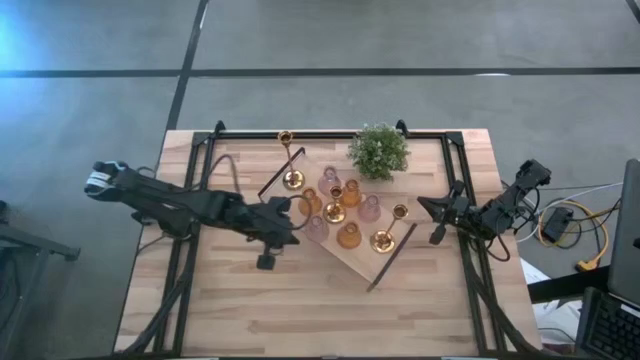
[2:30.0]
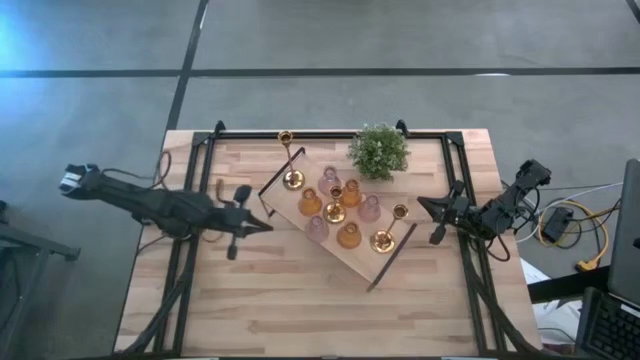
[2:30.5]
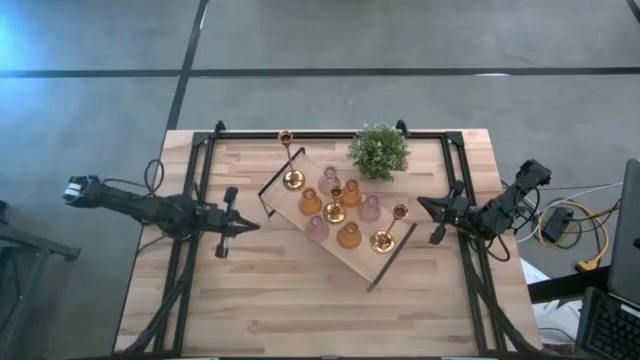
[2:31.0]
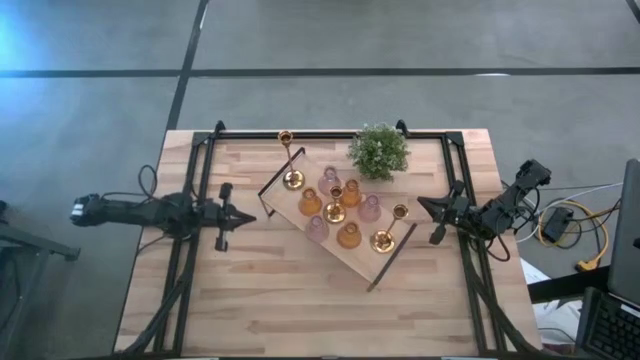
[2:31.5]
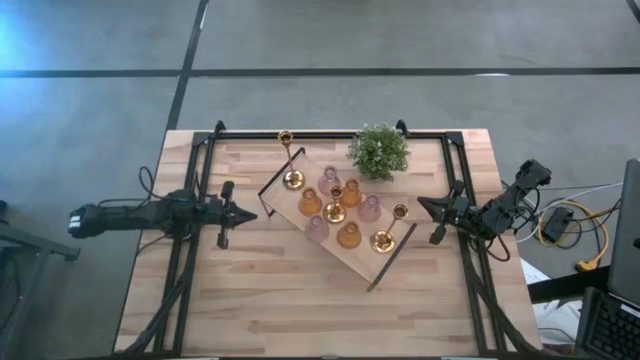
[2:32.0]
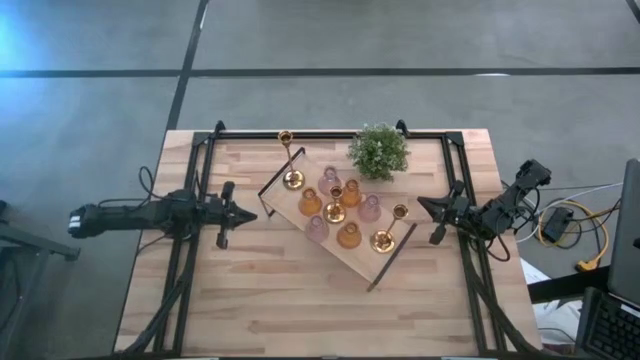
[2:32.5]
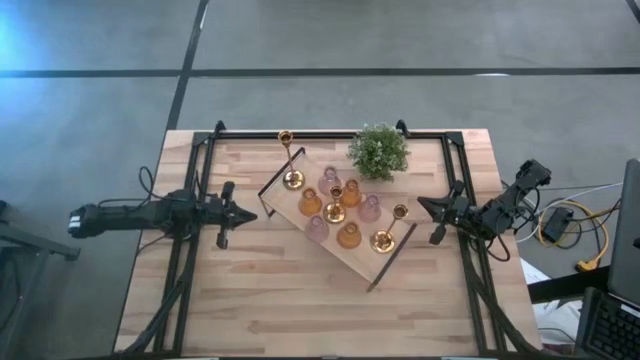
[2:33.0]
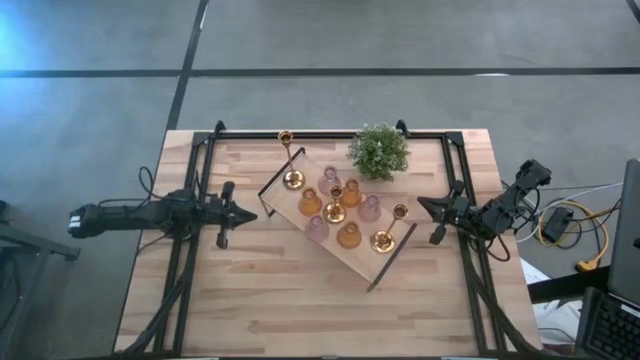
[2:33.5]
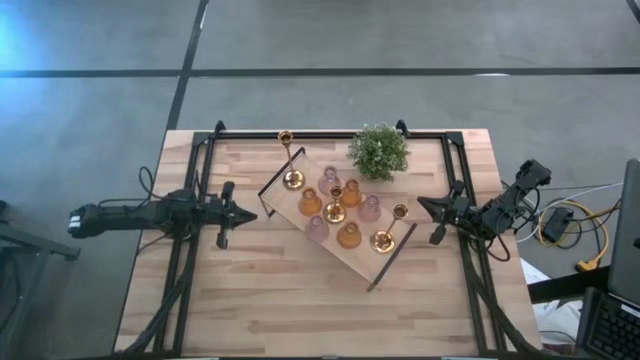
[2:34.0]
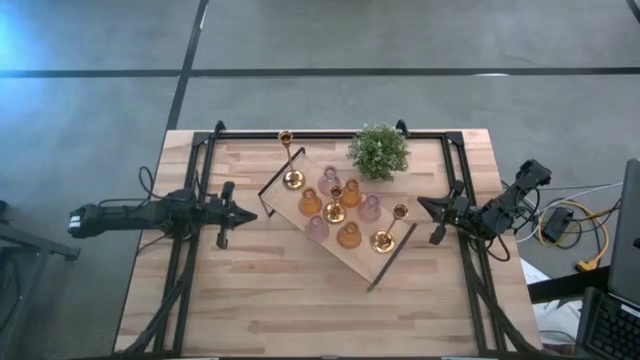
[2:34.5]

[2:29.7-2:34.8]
Task: Pick & Place candle stick holders
Return to Home Position

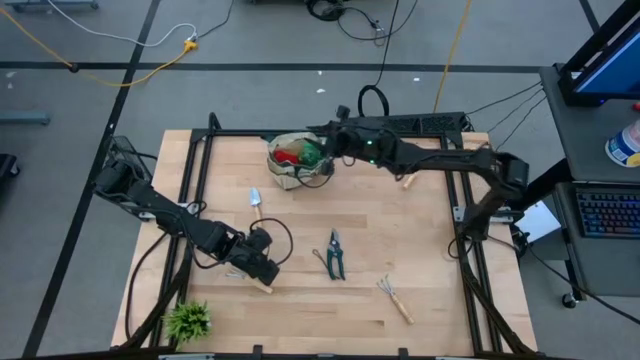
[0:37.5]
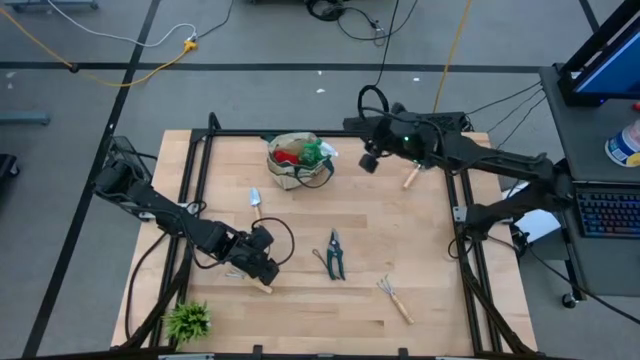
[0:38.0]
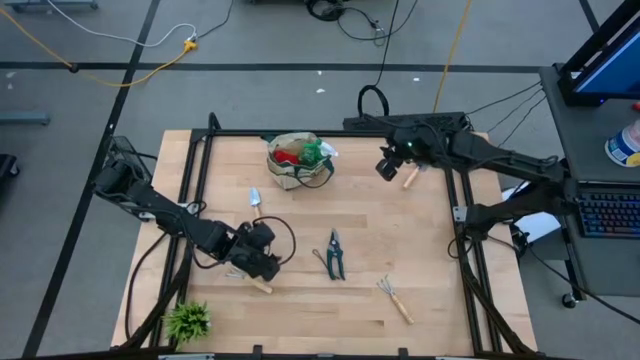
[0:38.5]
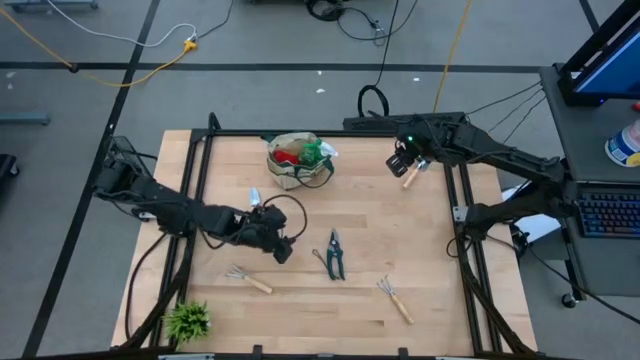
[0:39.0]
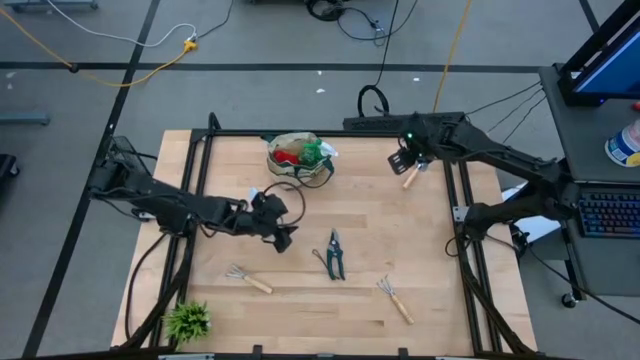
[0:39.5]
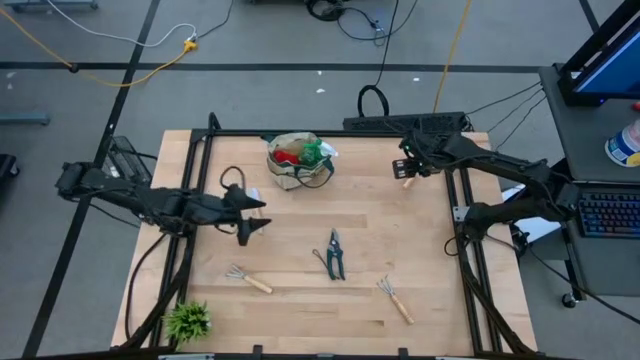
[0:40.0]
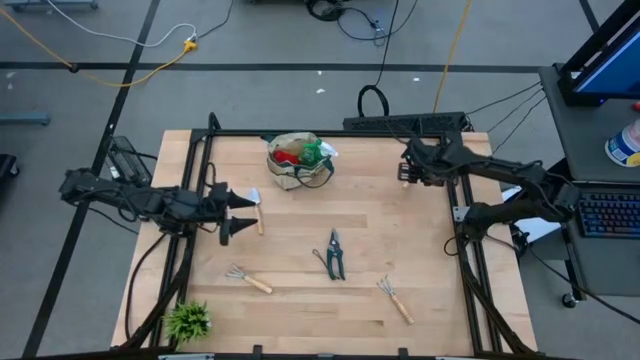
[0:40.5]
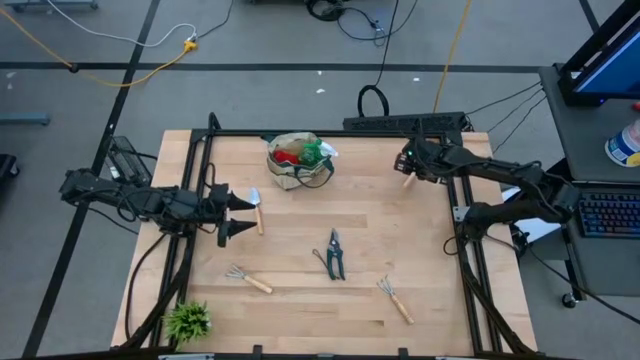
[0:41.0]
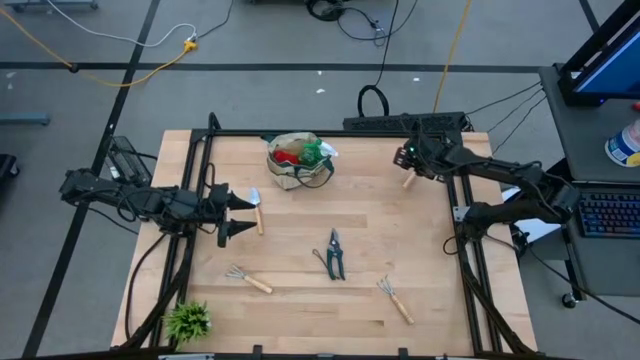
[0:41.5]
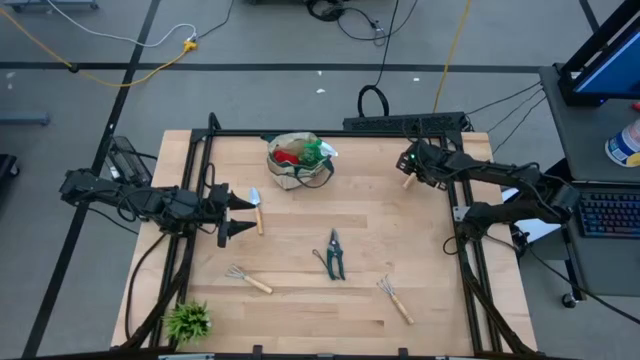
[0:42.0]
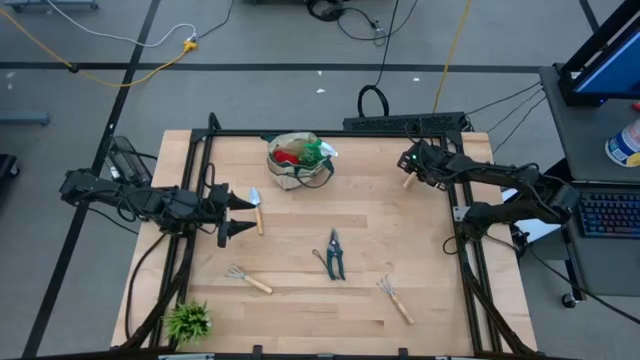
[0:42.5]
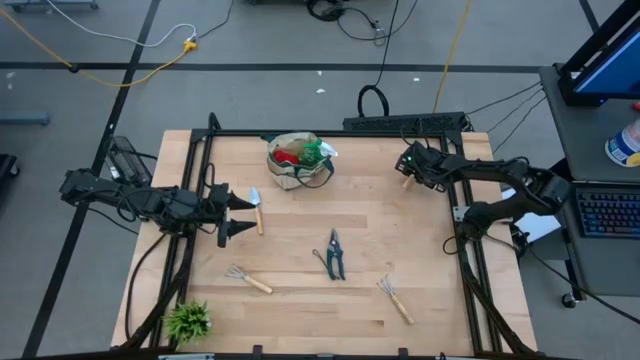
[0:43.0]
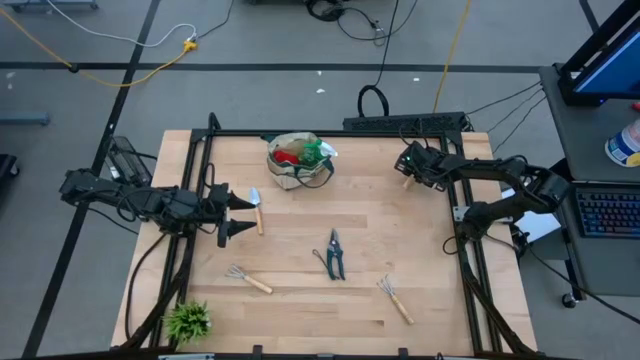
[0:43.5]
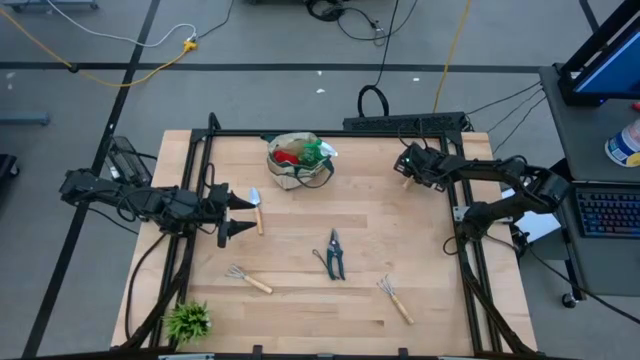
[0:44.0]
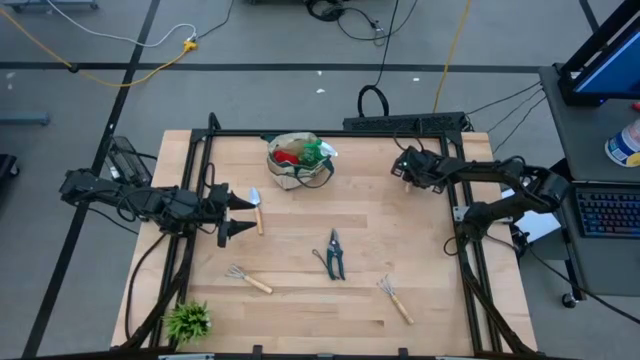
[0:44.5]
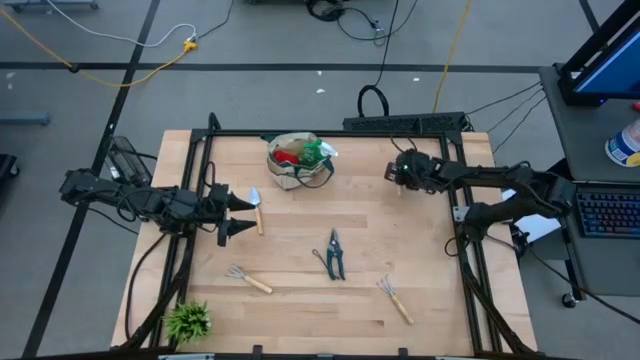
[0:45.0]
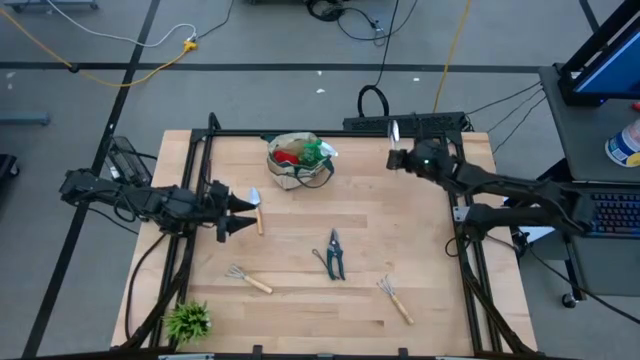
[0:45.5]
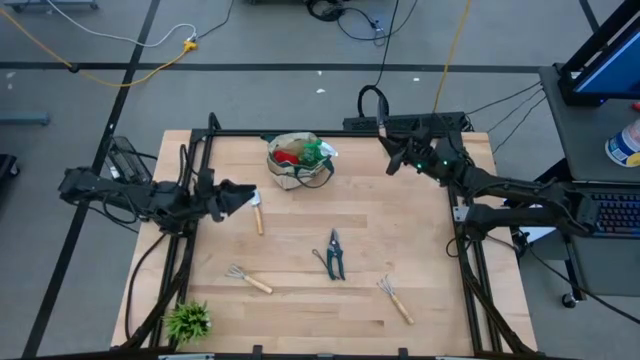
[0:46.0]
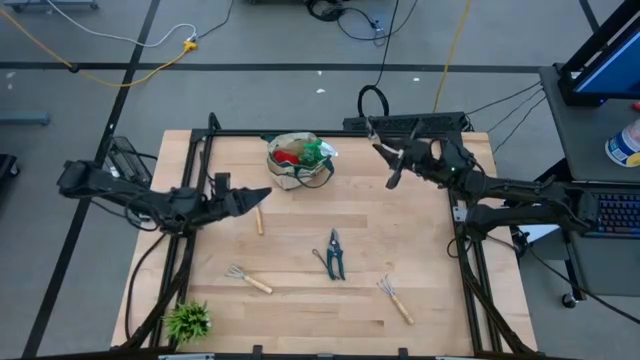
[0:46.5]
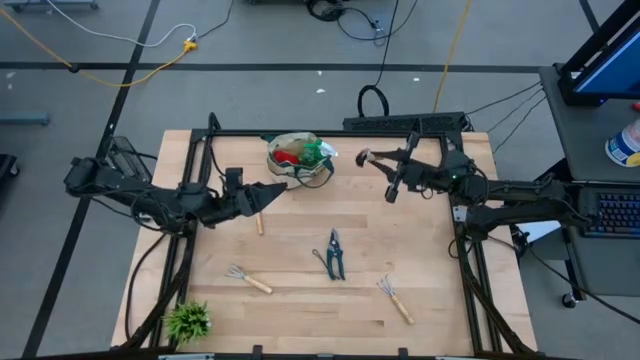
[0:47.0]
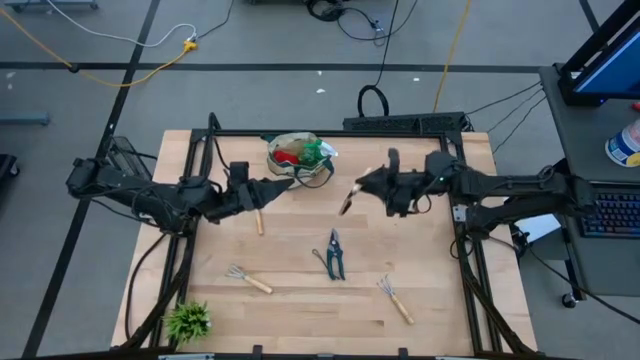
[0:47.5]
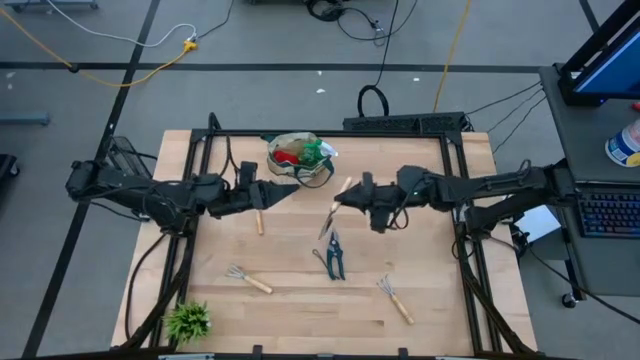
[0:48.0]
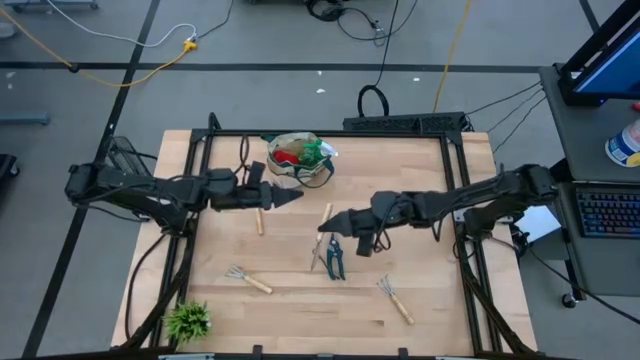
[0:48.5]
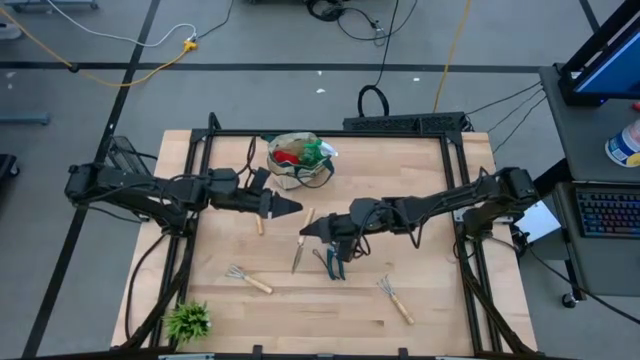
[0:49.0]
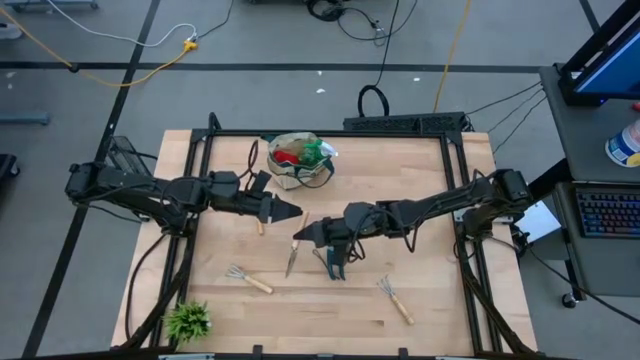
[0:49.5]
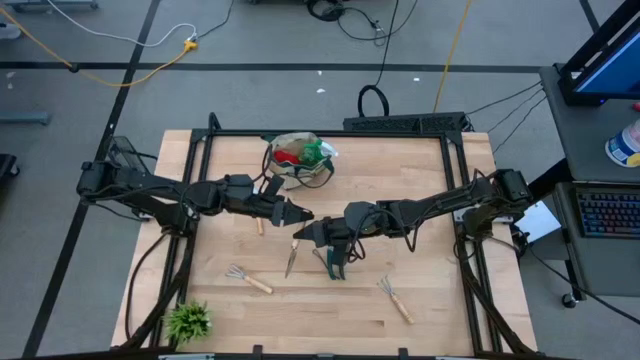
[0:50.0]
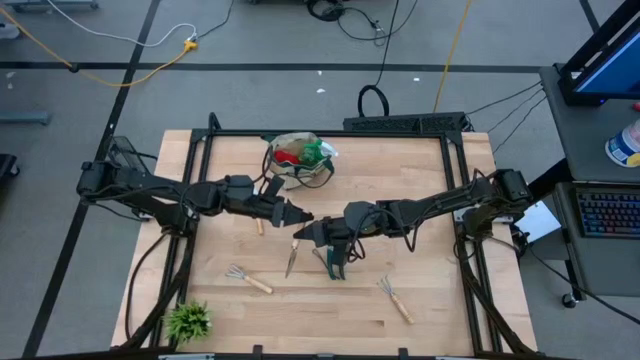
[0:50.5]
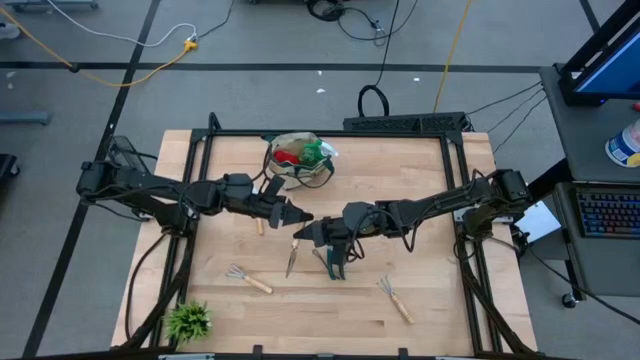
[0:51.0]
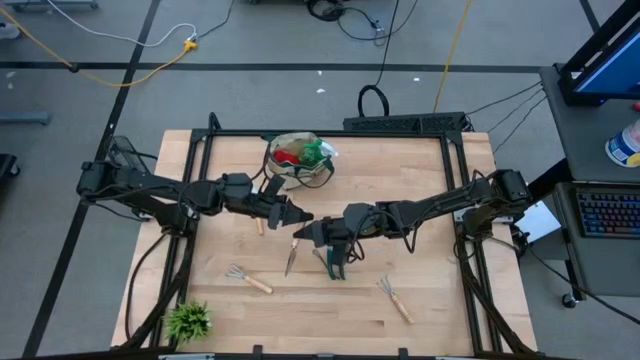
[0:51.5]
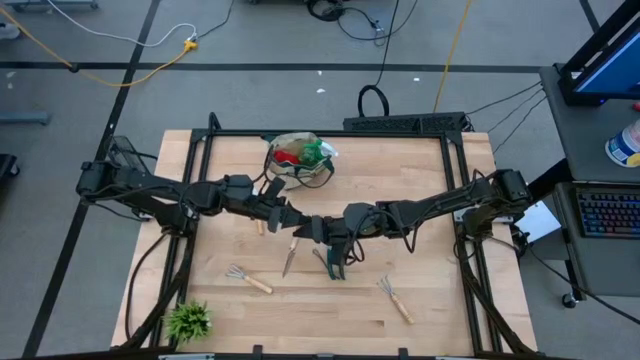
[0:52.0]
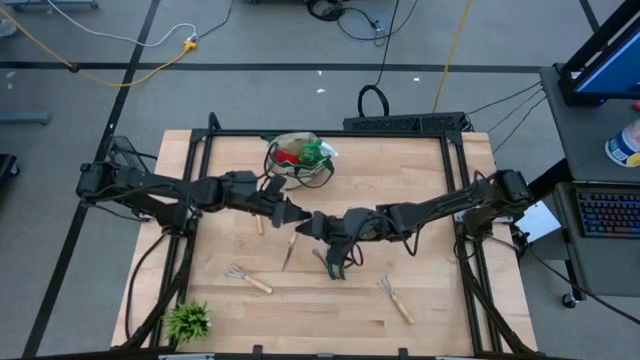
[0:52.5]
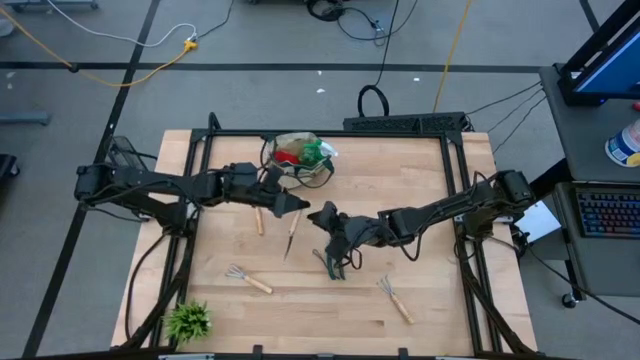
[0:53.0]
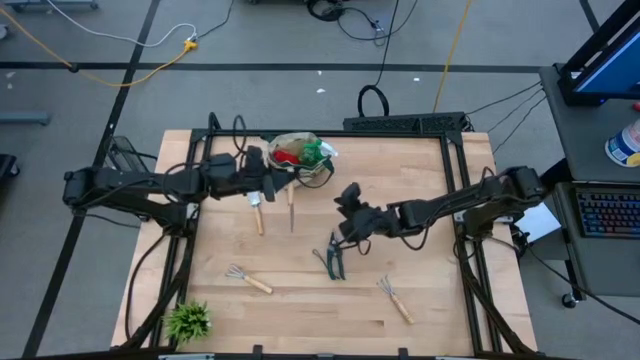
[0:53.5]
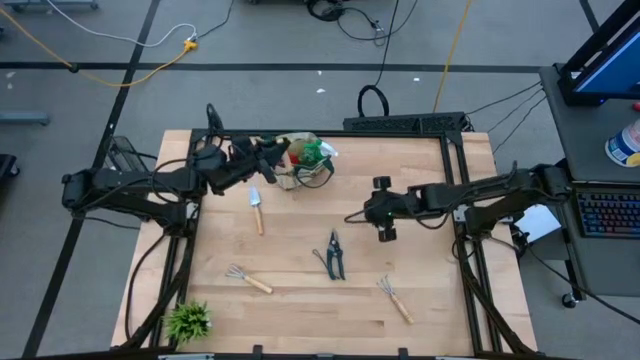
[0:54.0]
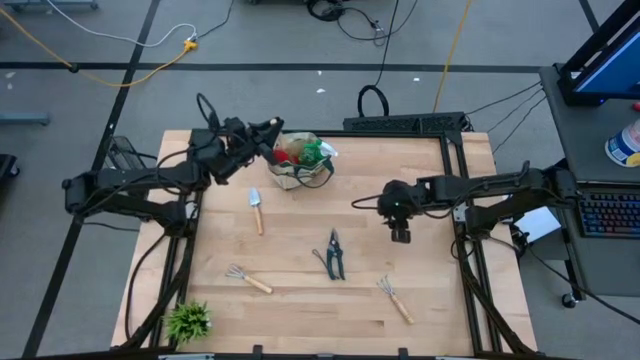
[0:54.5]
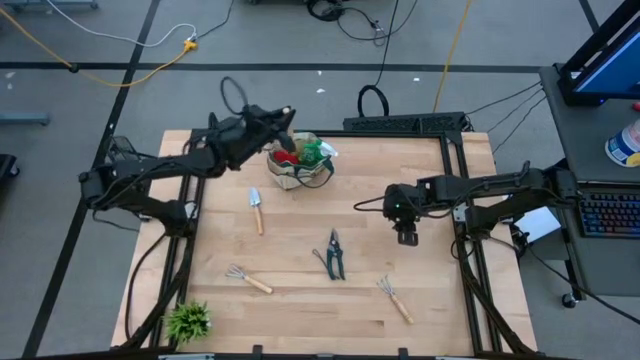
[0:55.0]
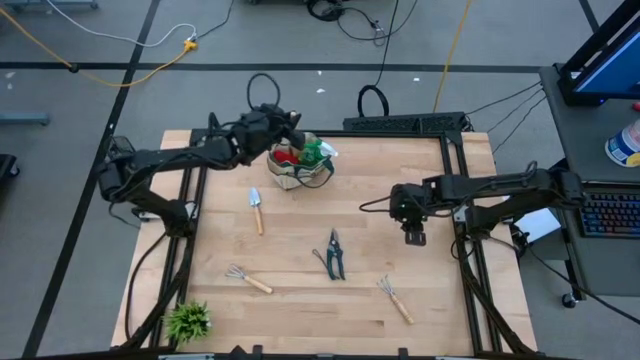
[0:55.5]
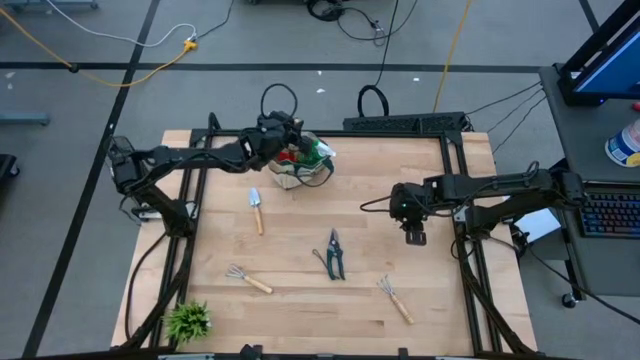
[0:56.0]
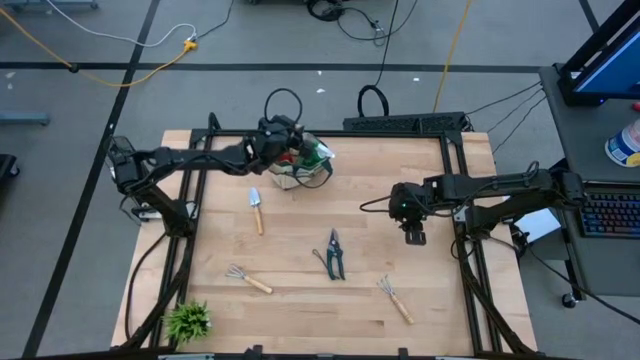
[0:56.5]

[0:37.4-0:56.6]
Task: Pick & Place Garden tools in Gardening bag
Put the right trowel into the gardening bag
